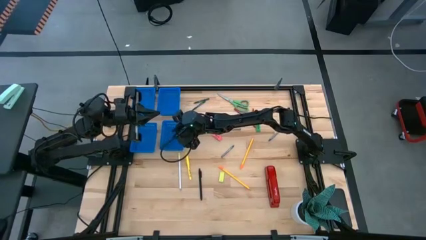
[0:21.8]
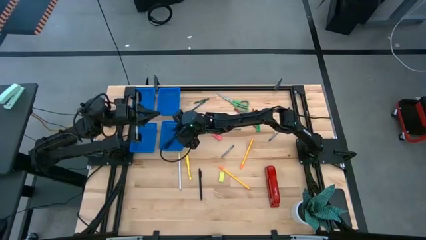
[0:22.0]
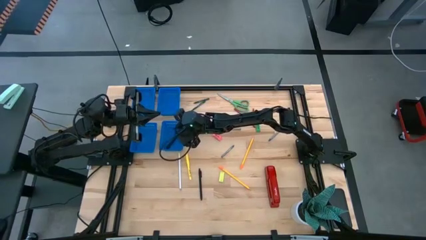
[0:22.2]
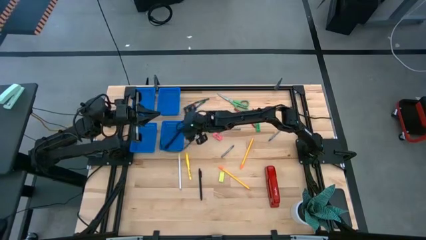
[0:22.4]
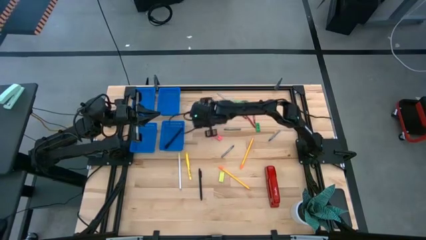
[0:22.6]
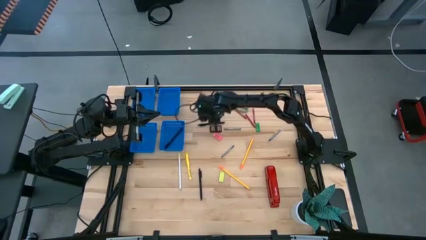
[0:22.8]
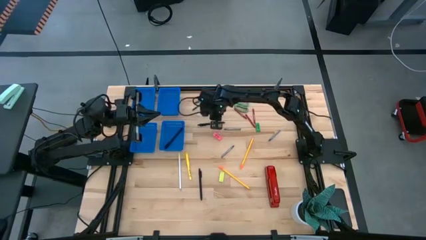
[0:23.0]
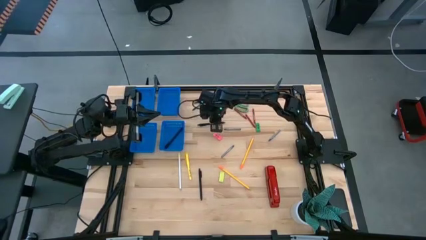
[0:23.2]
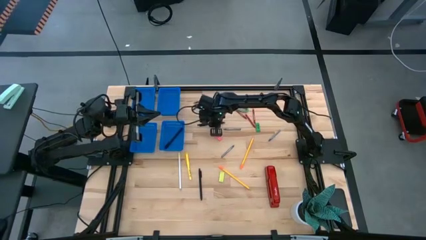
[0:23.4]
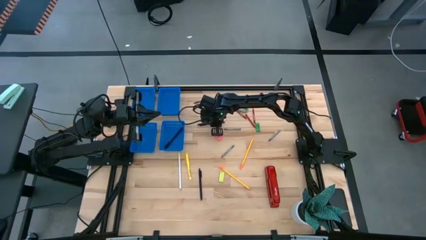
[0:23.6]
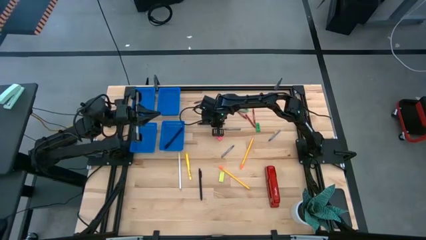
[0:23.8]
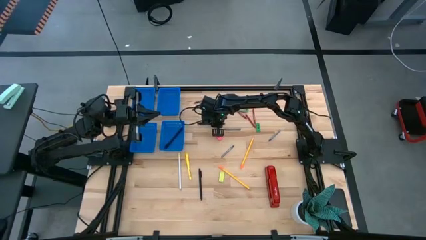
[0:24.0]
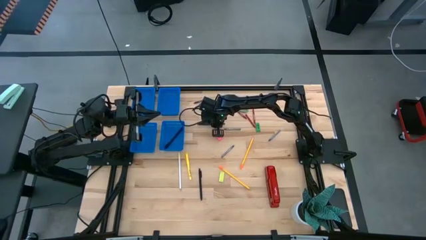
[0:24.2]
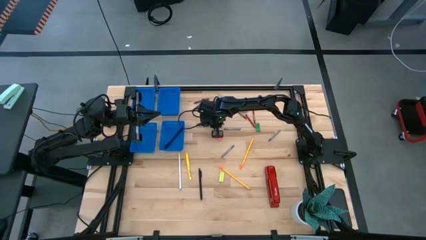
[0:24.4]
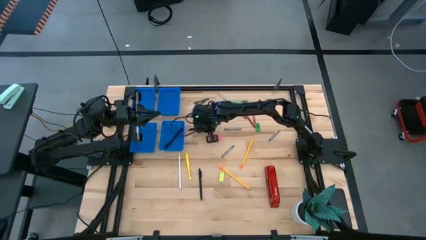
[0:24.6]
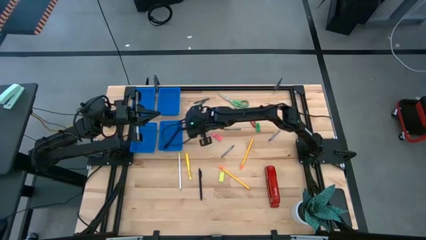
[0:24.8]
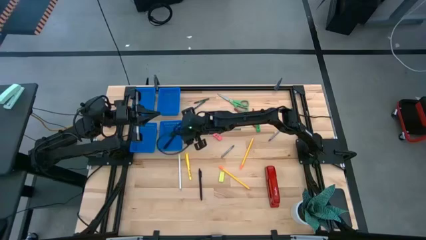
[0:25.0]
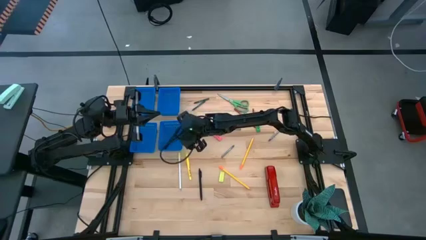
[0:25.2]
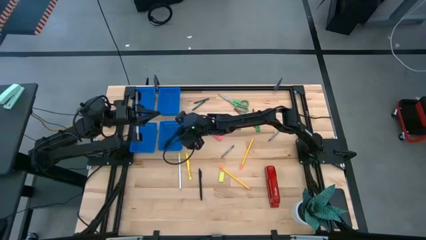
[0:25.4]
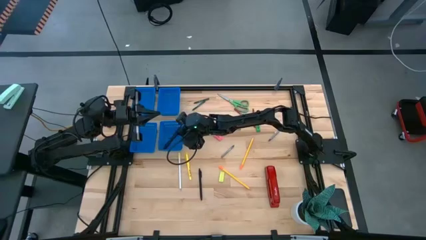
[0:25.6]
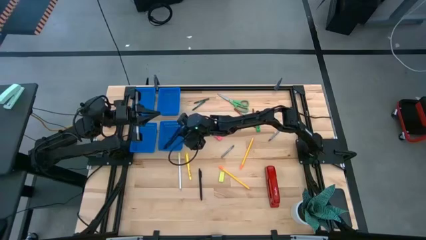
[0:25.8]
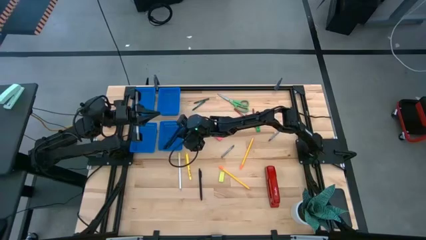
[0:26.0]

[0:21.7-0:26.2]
Task: Sort crayons/erasers/pens/pencils in bins
Put the top black pen into the bottom right blue bin

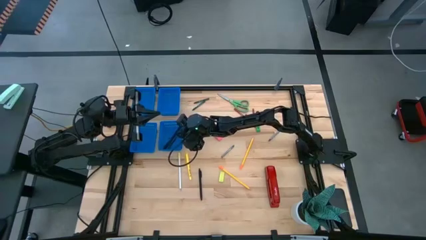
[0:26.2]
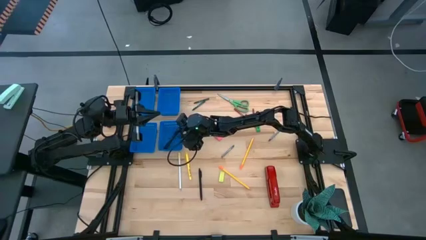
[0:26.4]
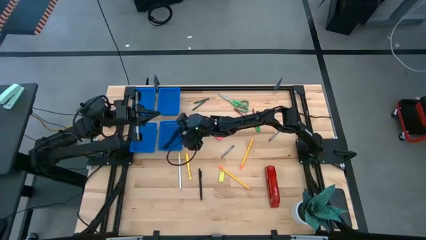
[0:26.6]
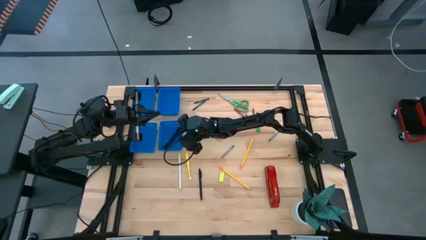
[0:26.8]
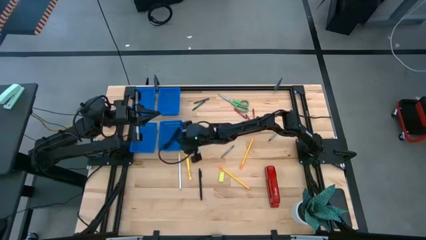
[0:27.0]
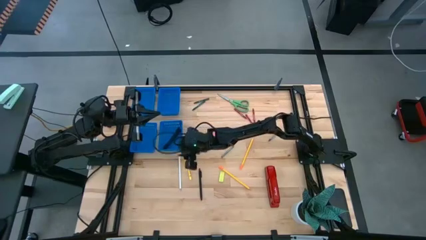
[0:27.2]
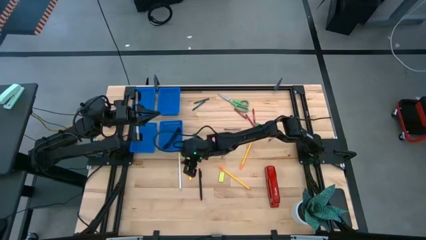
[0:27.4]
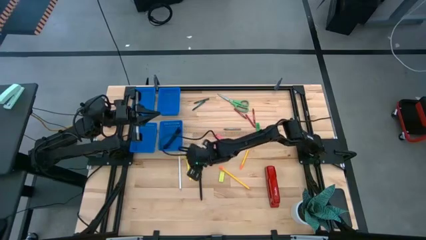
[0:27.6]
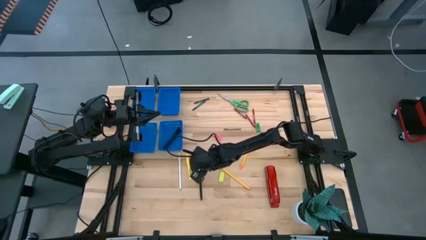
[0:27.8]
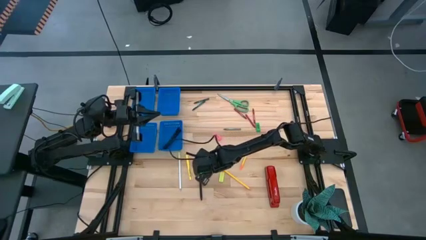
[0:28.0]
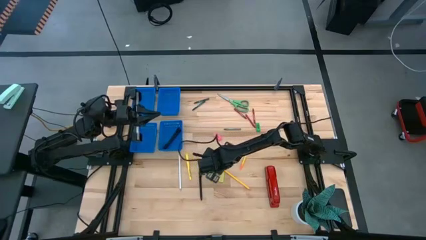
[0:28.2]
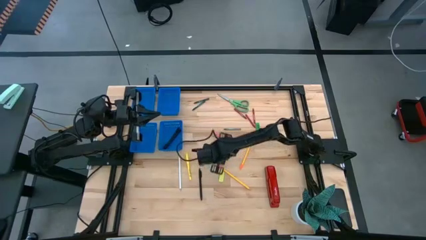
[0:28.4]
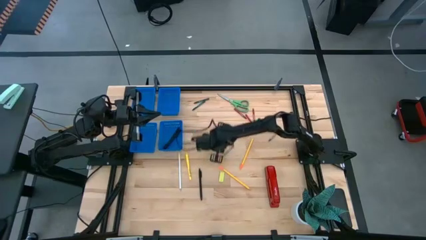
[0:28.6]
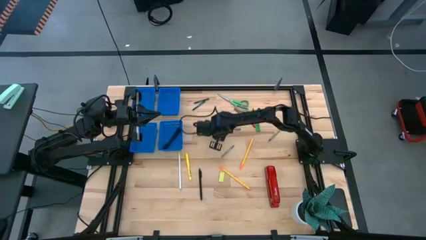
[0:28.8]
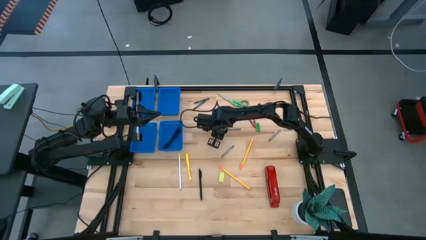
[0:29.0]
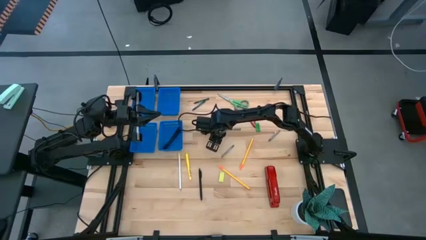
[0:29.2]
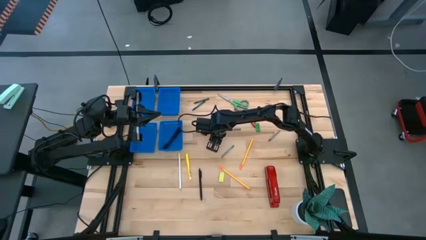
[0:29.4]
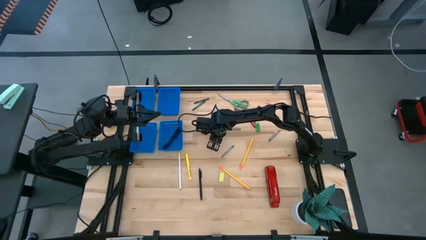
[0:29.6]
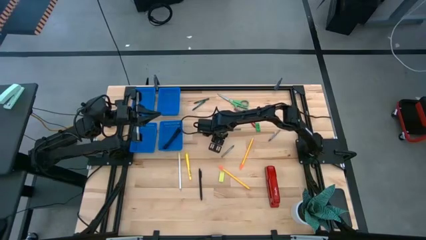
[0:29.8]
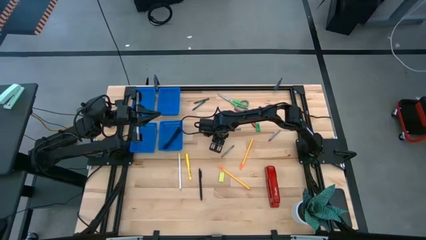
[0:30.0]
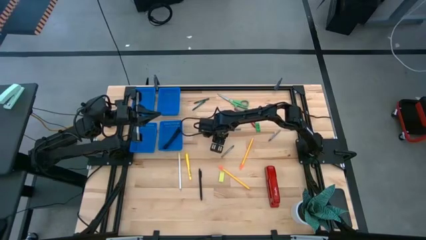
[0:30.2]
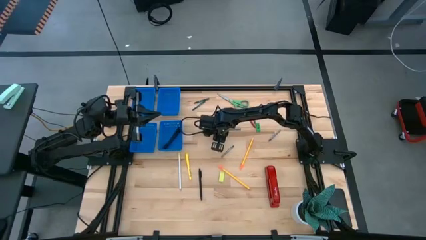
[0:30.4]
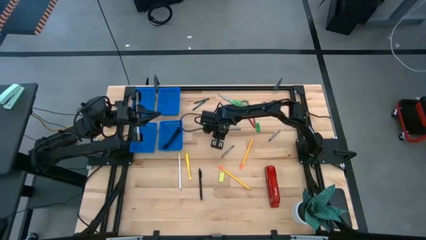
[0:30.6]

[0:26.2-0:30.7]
Put the pink eraser into the top right blue bin

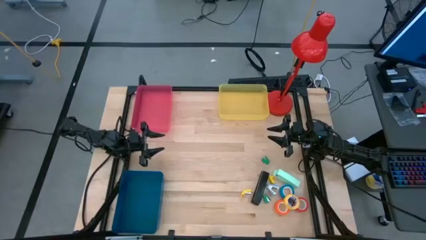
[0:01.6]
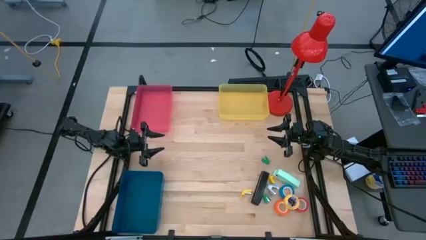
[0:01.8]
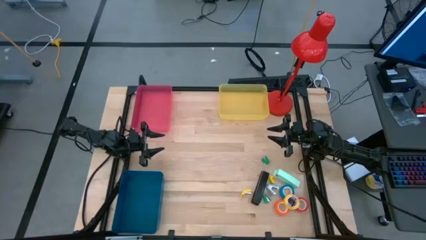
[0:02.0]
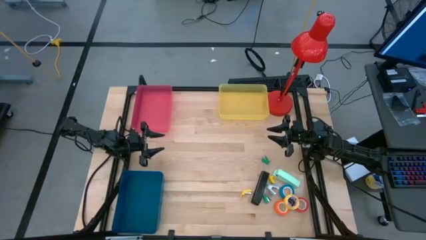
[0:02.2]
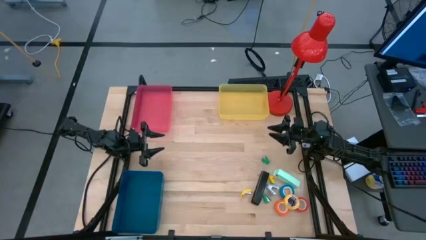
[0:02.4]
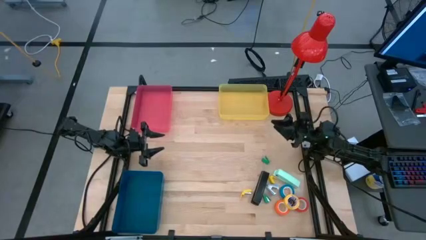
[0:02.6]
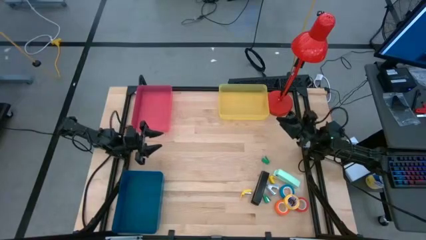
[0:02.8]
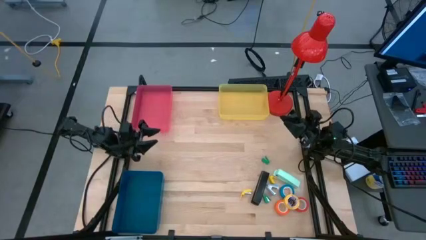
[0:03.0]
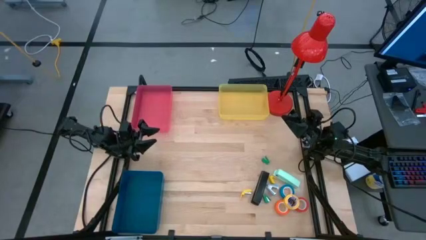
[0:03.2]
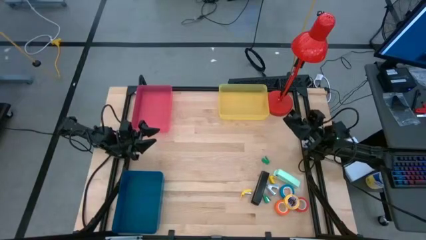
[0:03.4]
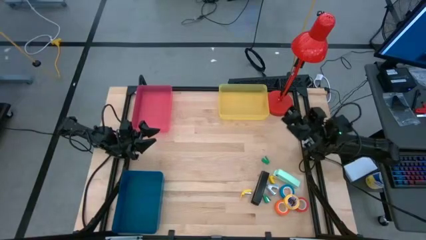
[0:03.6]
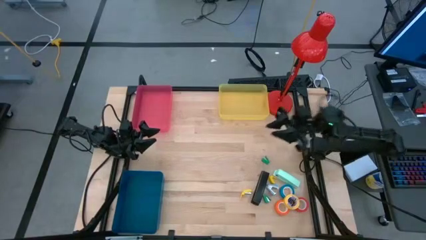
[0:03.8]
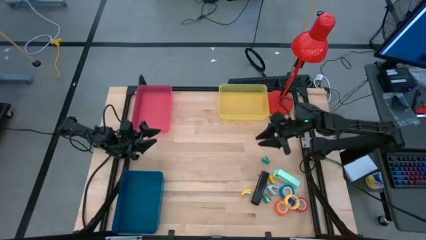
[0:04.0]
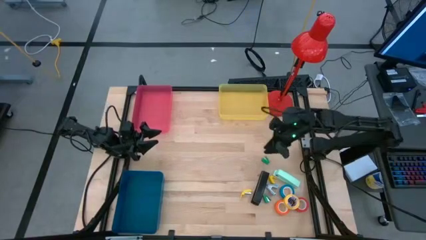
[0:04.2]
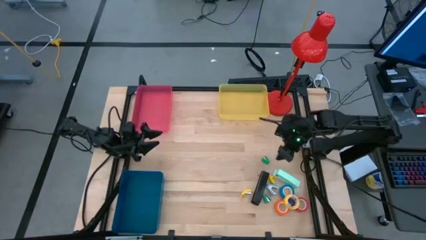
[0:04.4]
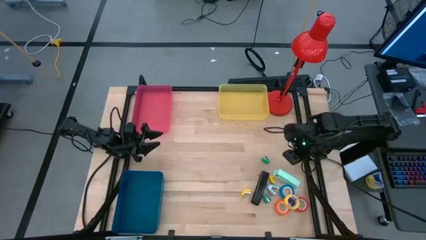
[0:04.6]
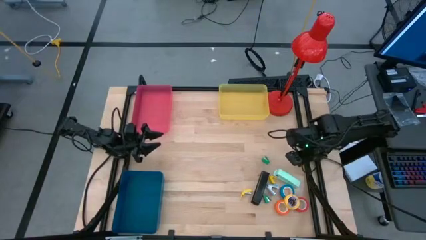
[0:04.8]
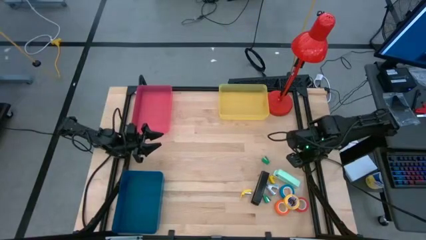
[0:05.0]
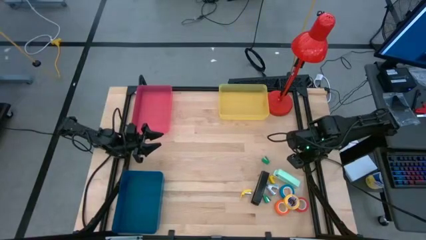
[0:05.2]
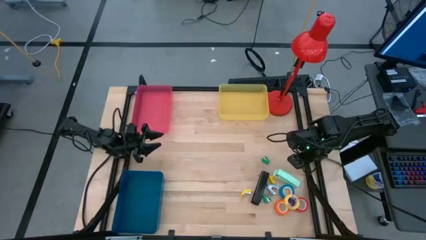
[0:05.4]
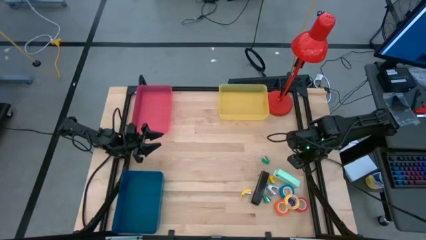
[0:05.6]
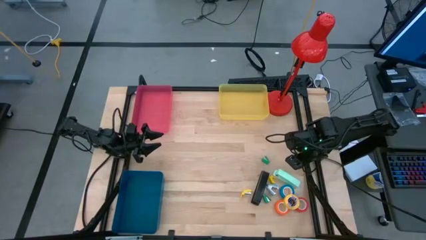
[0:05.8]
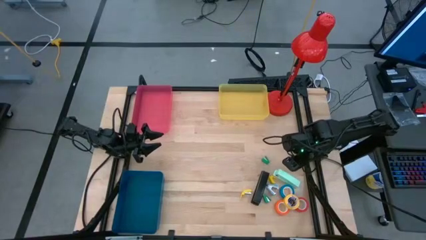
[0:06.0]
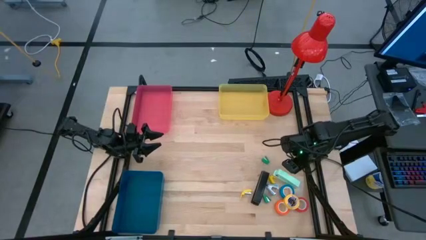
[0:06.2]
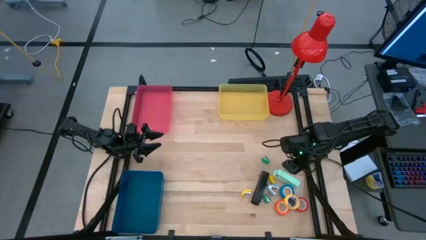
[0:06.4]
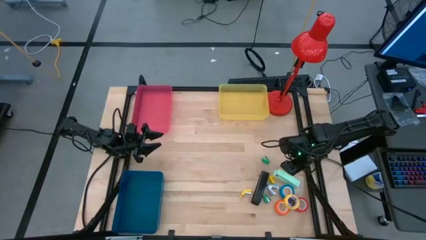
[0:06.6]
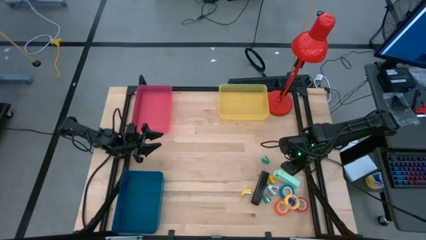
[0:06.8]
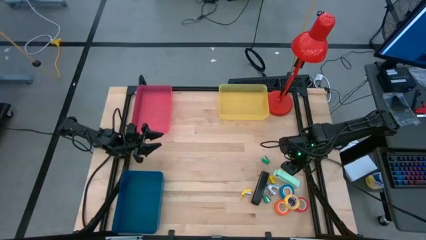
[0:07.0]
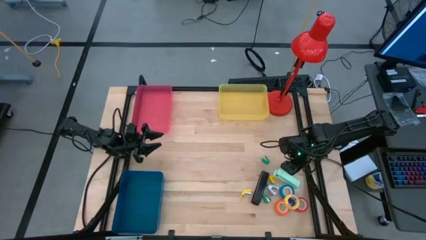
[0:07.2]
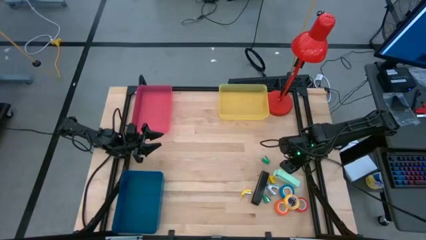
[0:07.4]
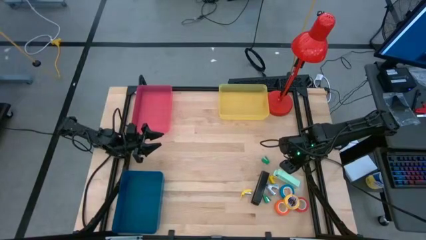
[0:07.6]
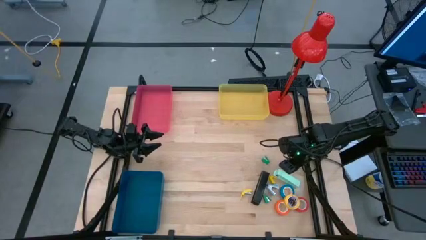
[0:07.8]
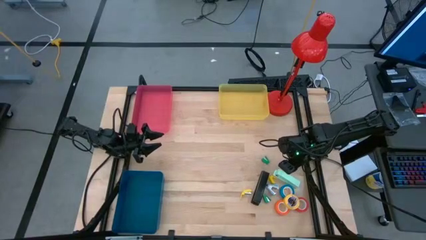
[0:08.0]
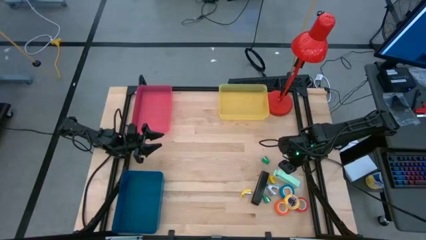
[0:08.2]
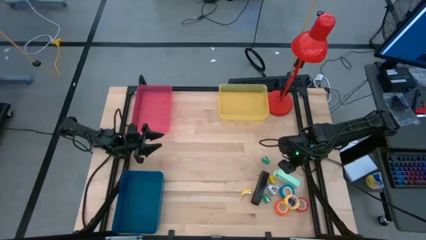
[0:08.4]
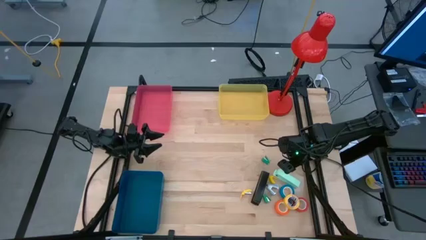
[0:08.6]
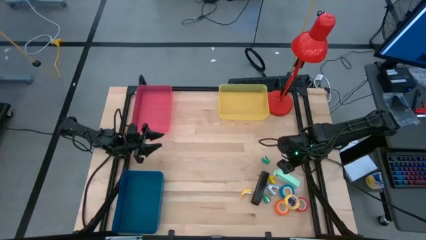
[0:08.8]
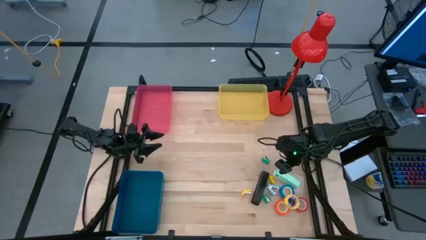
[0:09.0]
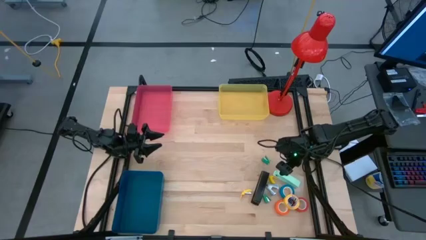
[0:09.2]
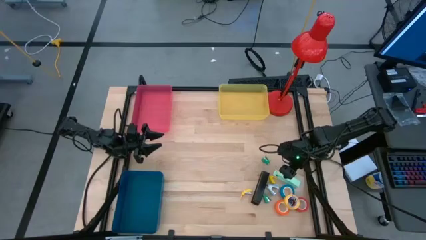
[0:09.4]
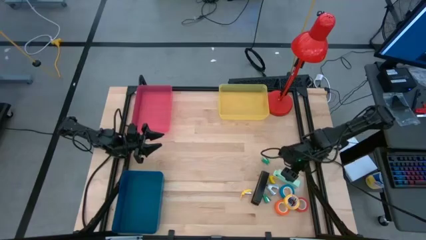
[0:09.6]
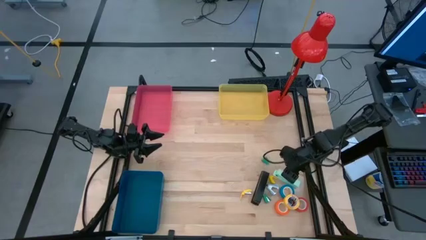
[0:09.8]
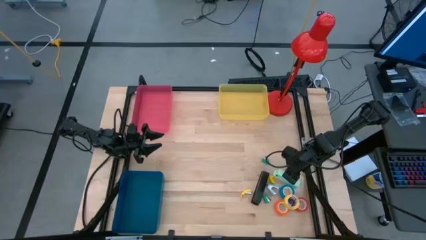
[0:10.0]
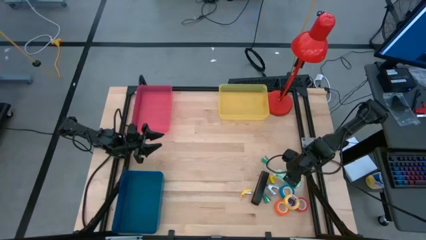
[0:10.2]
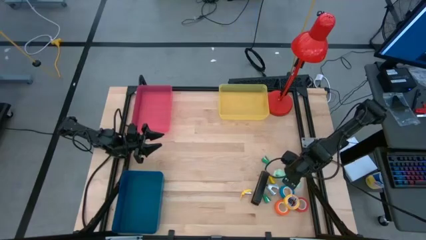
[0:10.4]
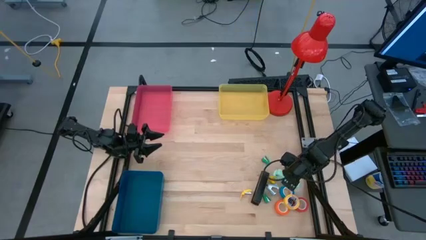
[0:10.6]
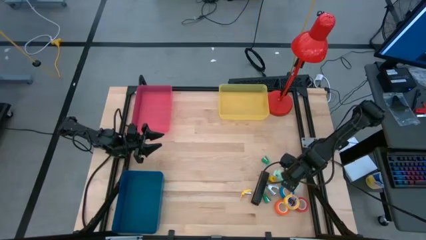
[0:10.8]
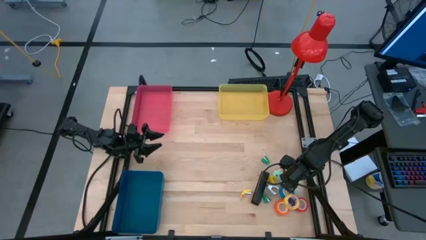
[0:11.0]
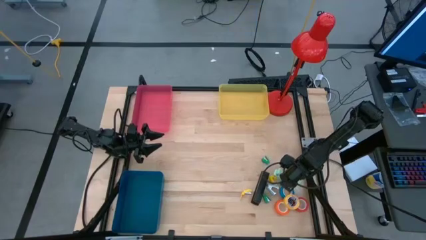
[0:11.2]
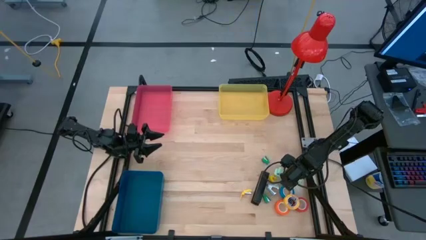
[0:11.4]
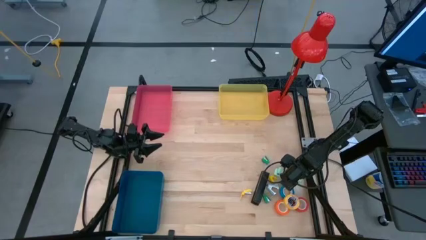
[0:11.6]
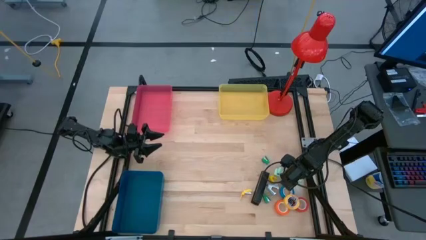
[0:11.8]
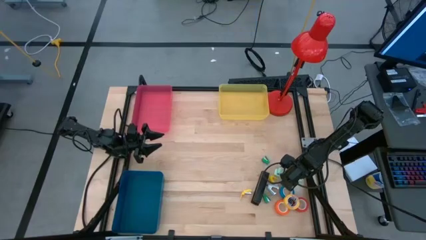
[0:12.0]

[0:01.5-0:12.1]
Task: Pick and place Stapler, Stapler remover, tape
Put the light blue stapler into the red bin
